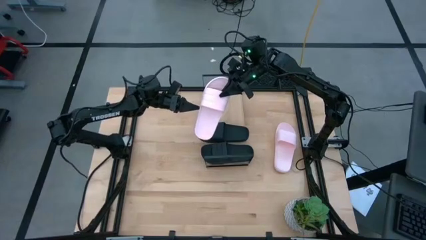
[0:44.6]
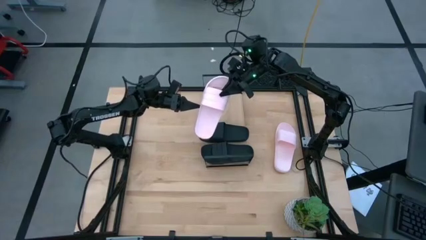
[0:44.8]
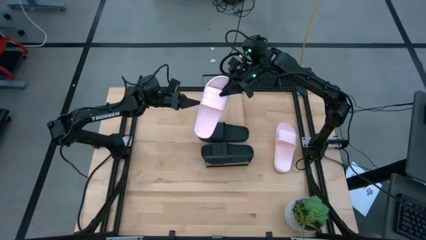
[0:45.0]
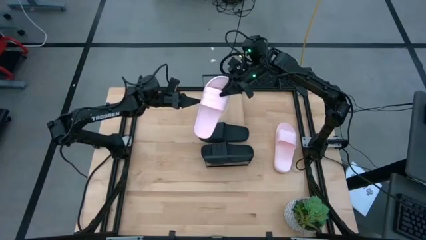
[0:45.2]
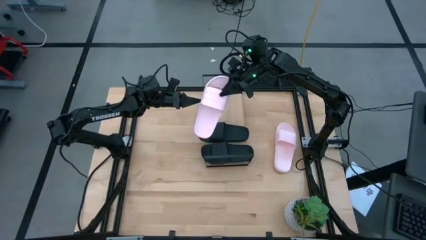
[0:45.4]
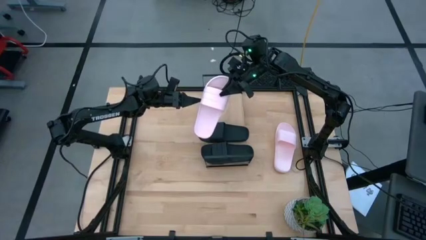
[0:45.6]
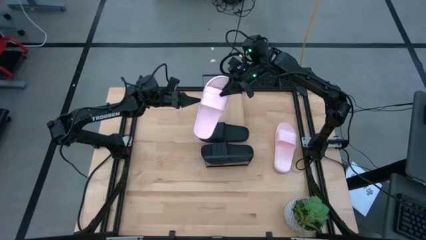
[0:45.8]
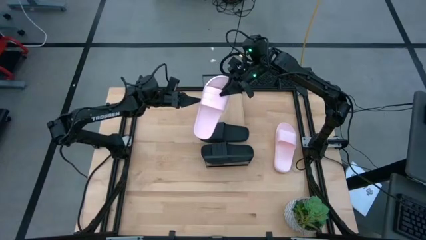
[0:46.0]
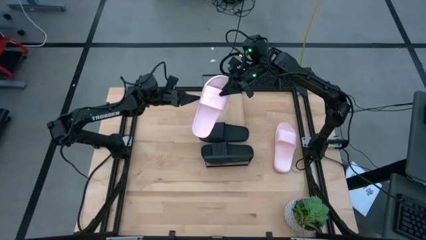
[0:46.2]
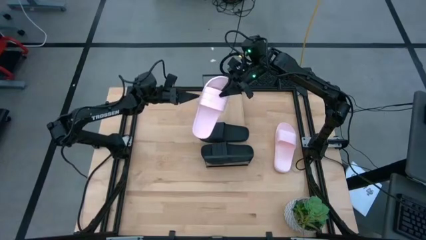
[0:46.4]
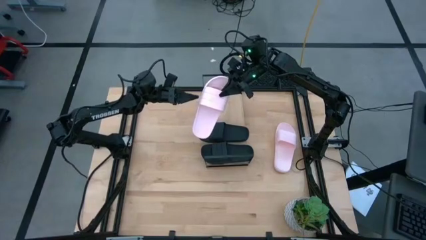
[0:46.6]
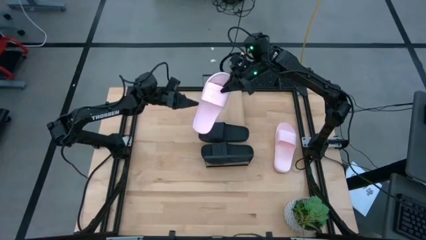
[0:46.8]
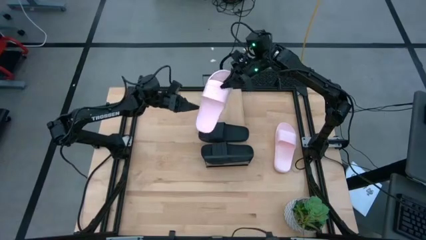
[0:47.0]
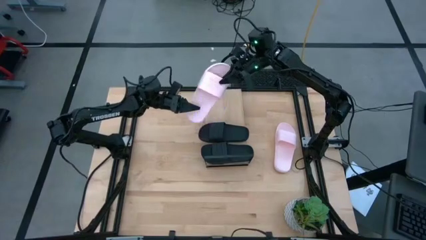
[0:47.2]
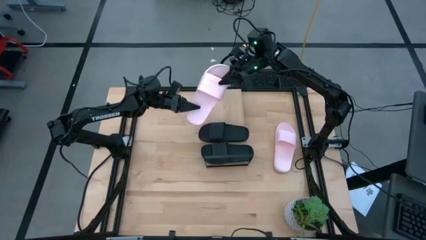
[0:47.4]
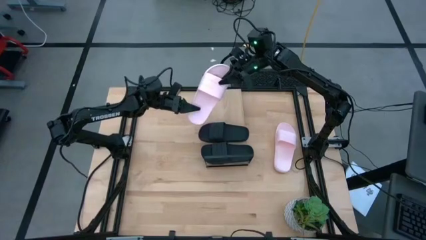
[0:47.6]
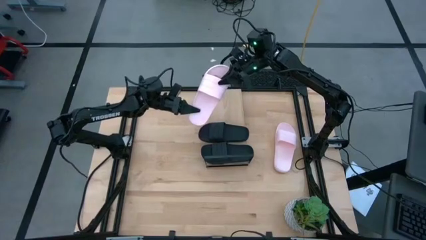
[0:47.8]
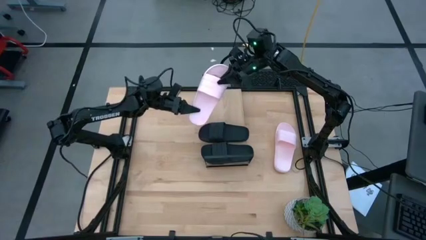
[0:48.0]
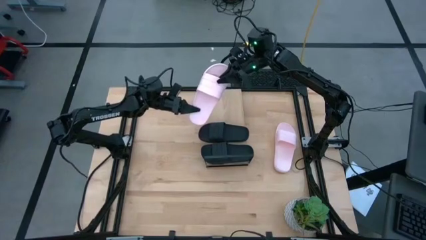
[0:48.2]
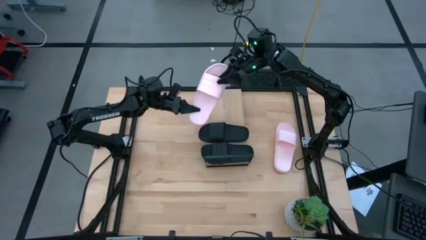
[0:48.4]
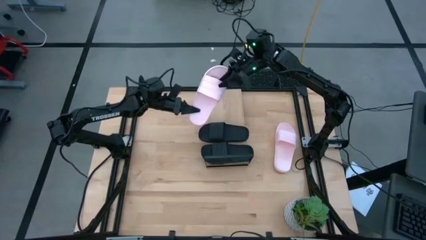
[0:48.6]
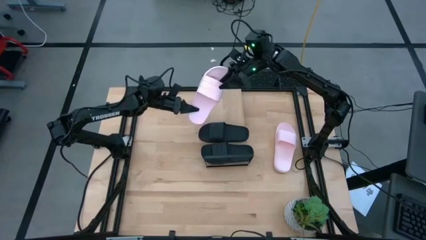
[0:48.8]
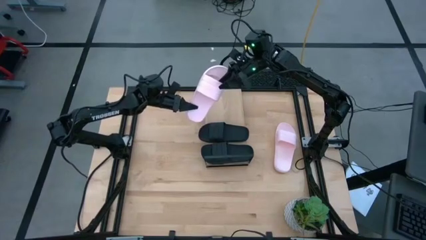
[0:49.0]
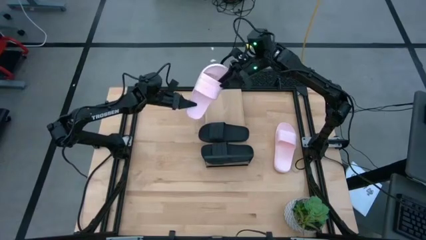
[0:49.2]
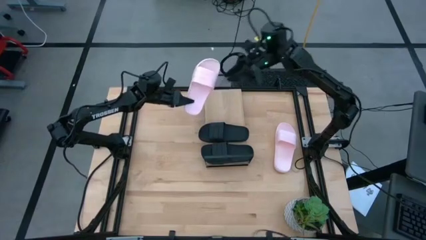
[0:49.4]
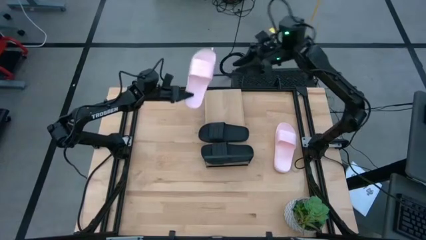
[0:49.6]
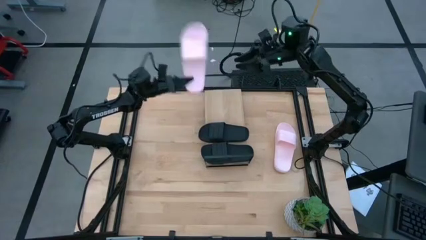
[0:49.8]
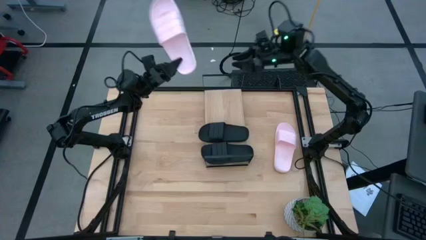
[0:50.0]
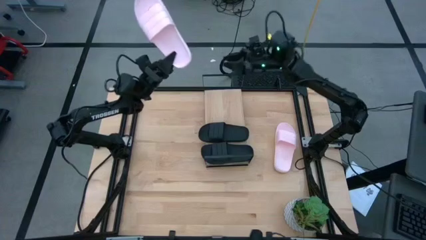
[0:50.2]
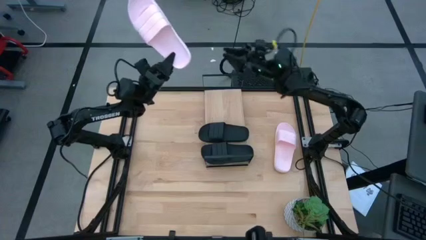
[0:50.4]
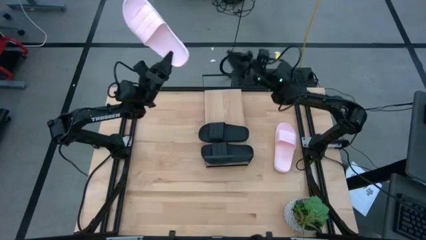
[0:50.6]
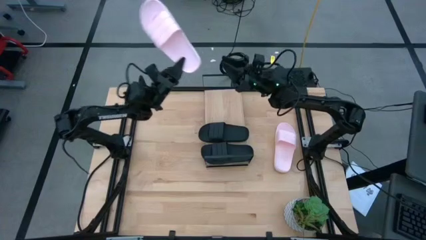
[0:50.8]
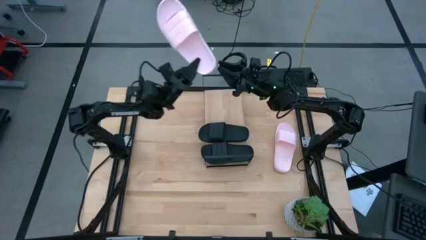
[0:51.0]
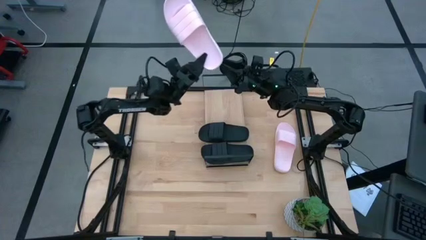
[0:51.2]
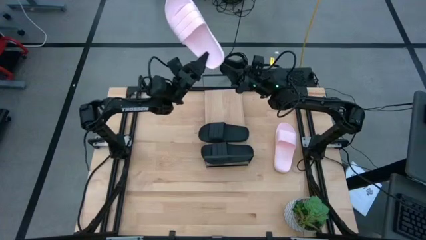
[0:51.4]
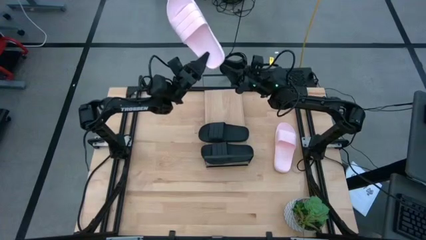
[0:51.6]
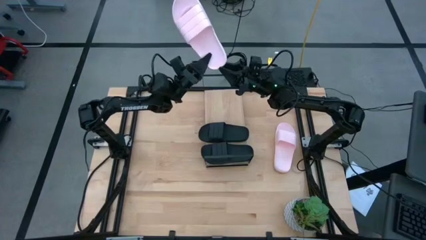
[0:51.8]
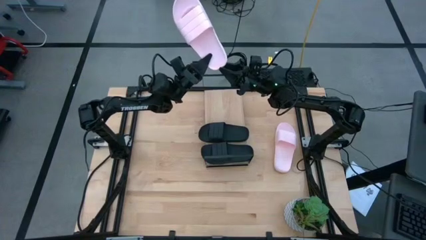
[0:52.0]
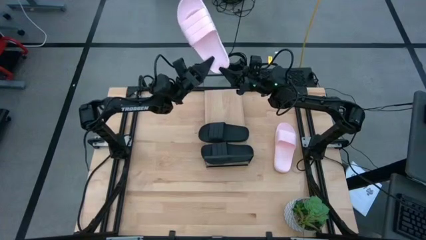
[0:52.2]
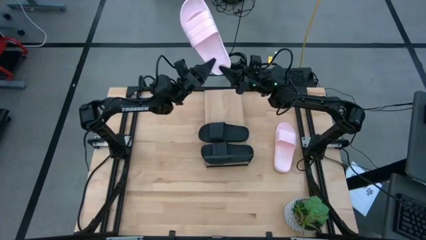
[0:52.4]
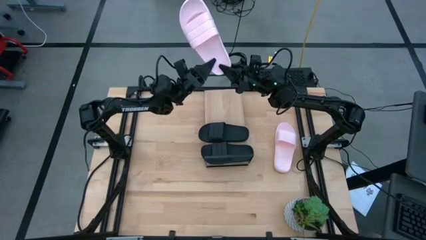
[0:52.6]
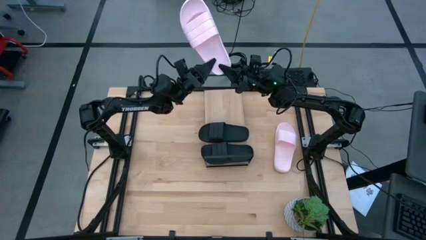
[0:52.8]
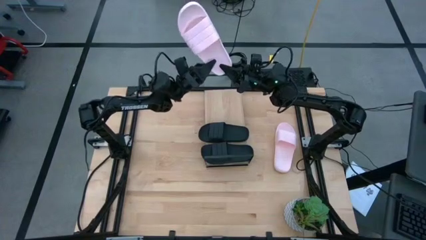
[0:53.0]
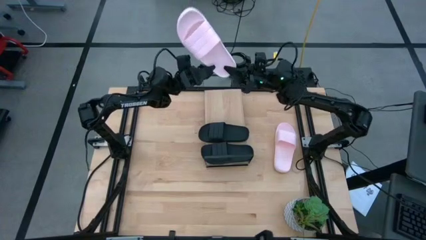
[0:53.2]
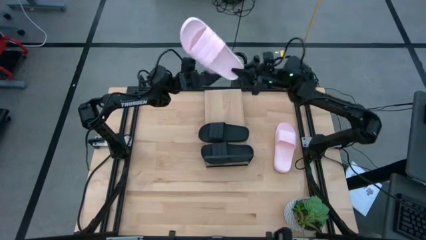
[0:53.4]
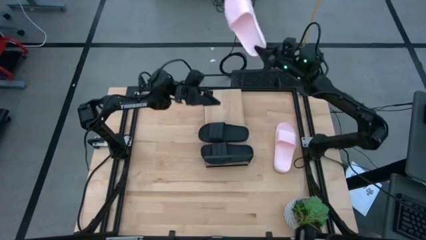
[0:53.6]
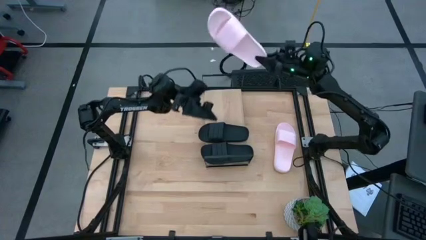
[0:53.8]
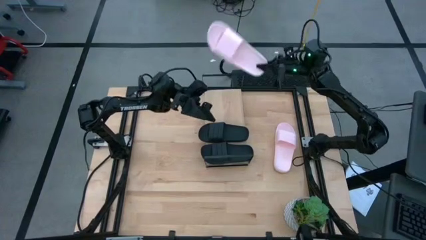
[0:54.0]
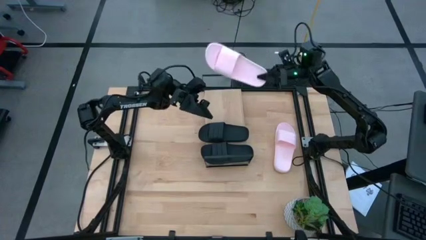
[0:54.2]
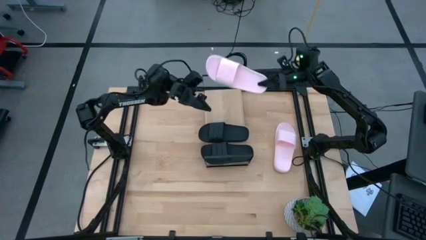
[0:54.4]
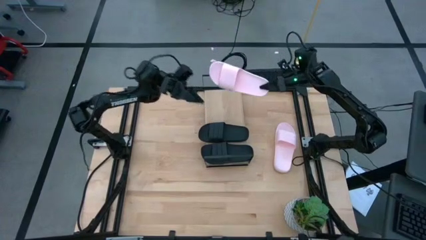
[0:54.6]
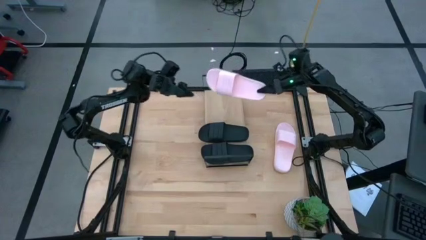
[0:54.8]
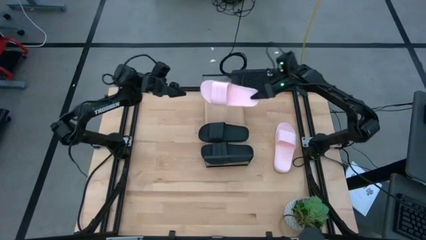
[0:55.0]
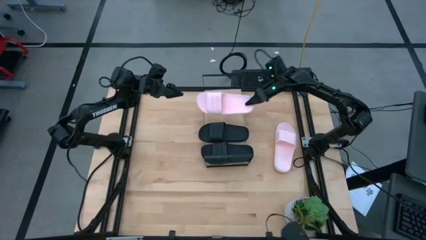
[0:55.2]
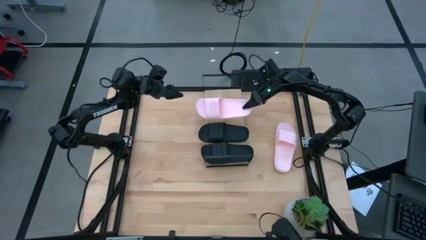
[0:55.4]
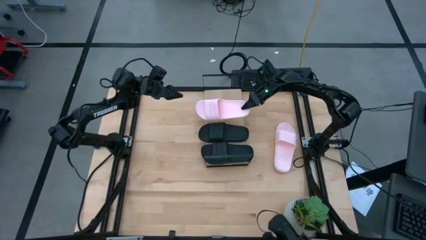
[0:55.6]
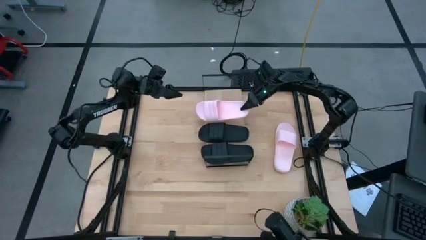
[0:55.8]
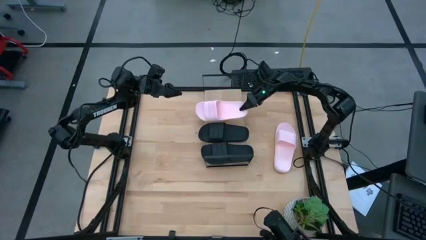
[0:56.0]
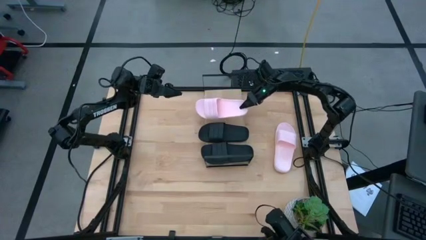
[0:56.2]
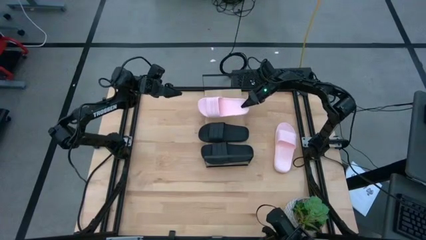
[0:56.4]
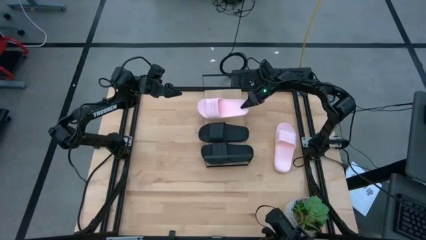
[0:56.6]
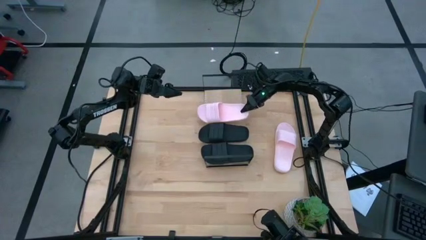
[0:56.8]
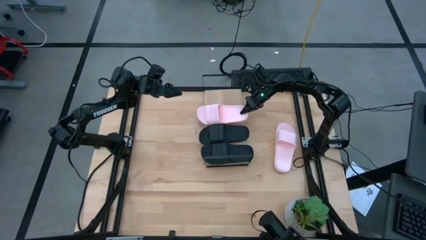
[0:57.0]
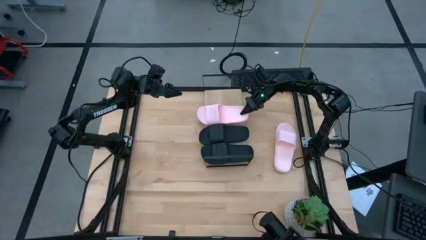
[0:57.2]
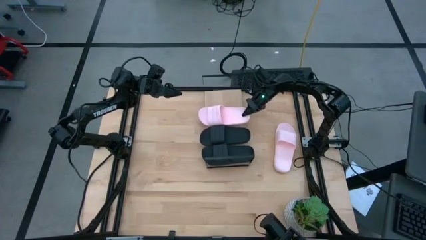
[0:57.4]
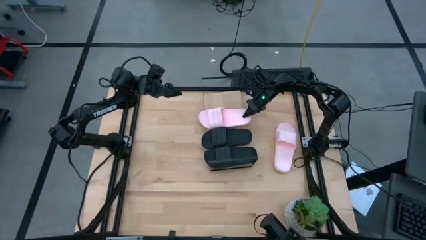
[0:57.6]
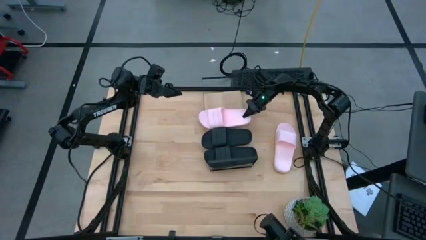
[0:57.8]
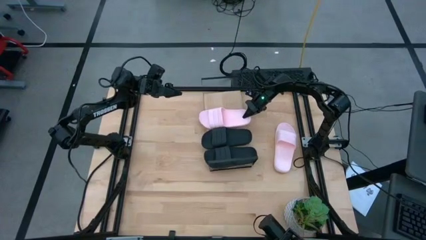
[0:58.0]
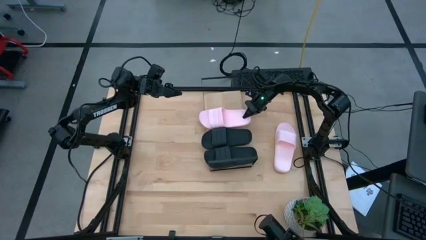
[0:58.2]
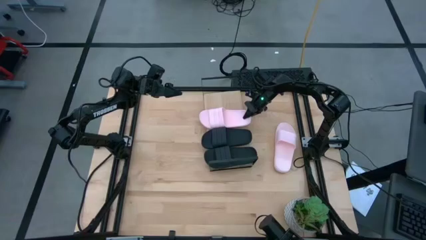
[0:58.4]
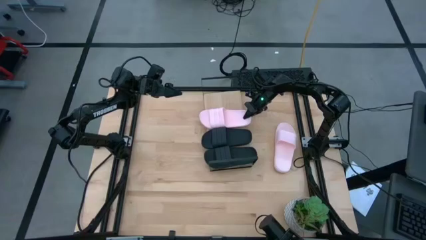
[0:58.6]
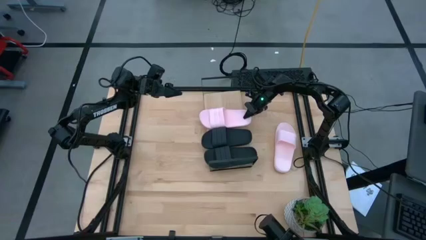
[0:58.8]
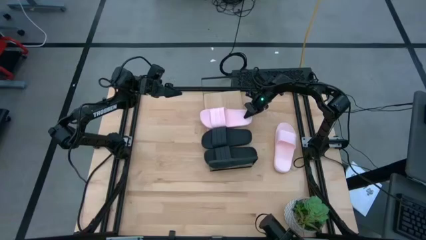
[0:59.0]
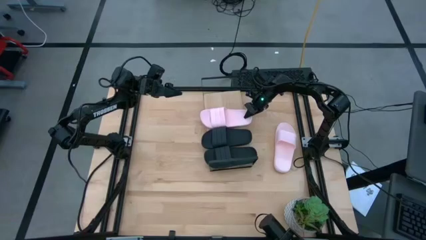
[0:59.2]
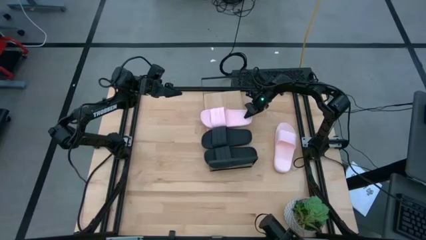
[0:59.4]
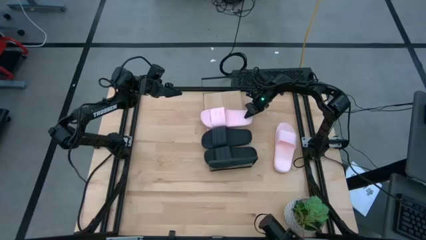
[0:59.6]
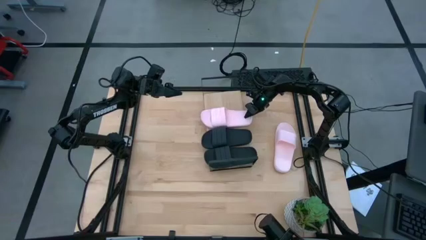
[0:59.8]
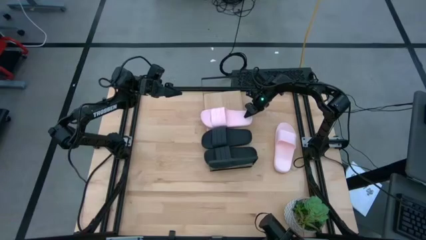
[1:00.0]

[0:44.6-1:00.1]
Task: Pick and place slides into the shelf
Put the left pink slide on the shelf
